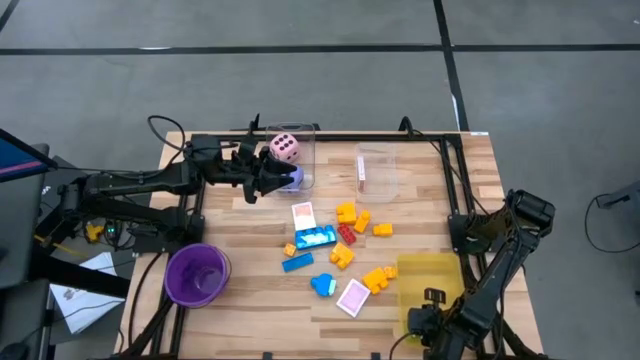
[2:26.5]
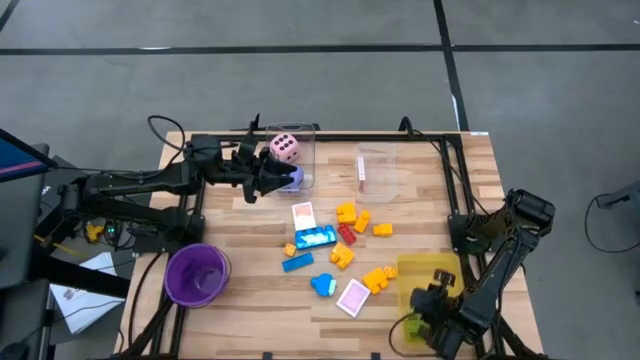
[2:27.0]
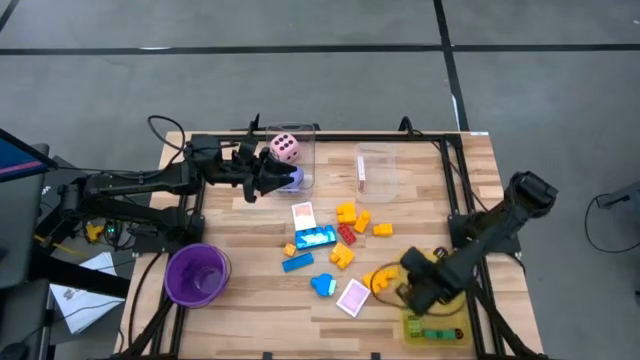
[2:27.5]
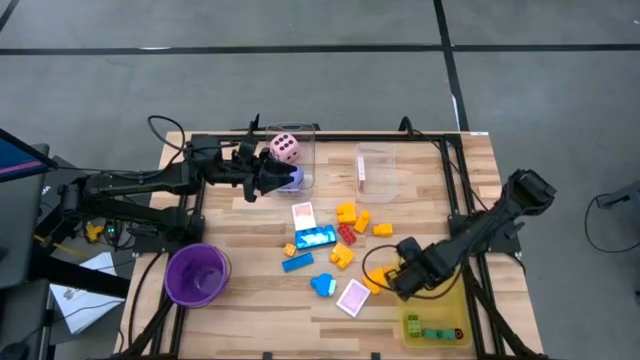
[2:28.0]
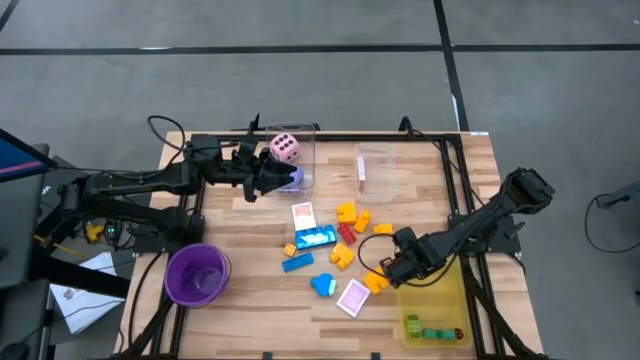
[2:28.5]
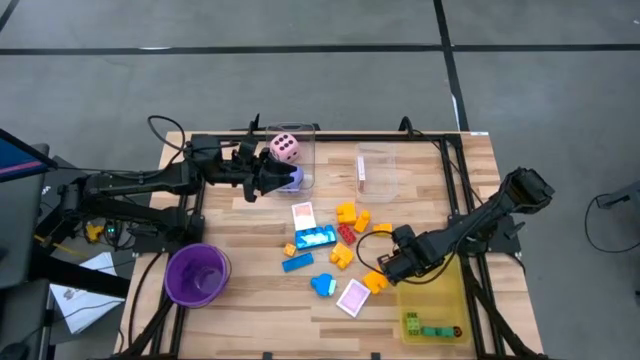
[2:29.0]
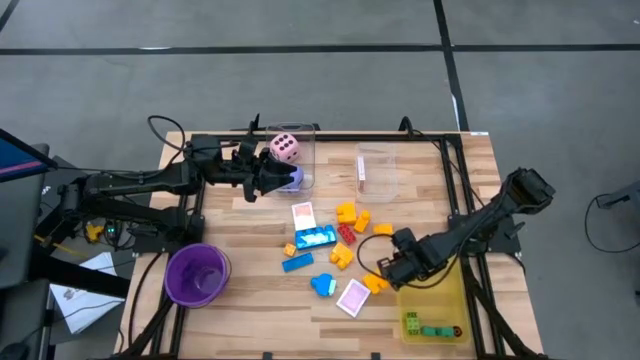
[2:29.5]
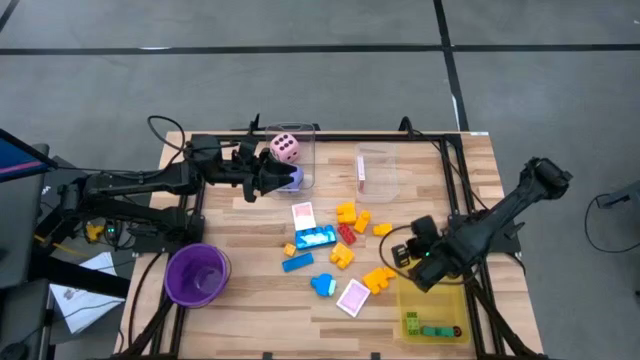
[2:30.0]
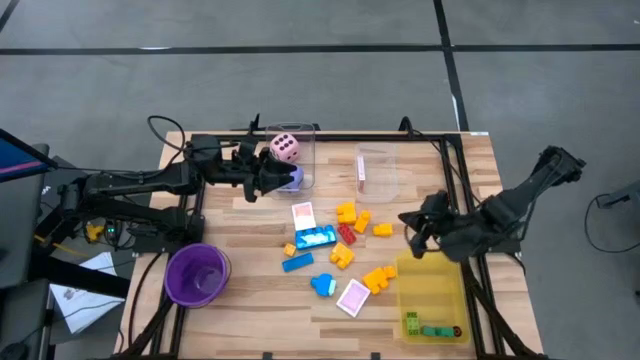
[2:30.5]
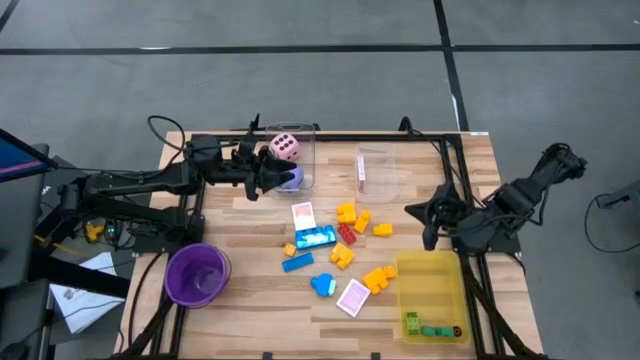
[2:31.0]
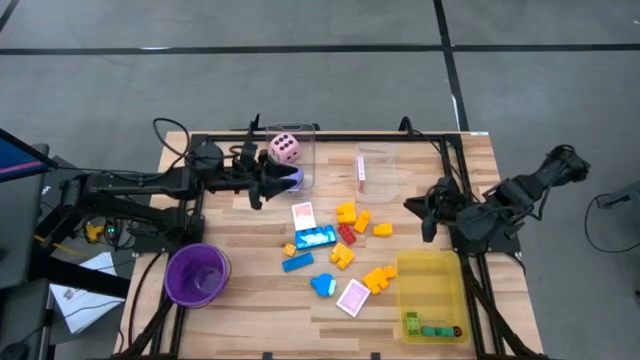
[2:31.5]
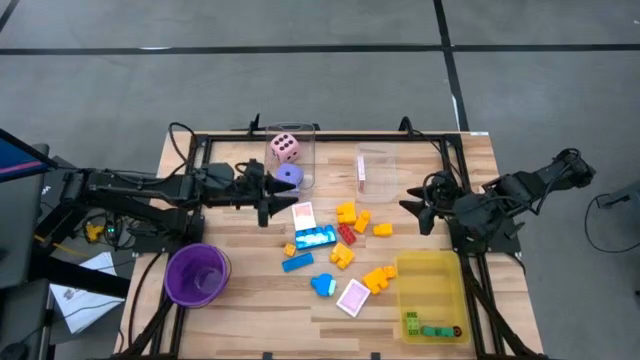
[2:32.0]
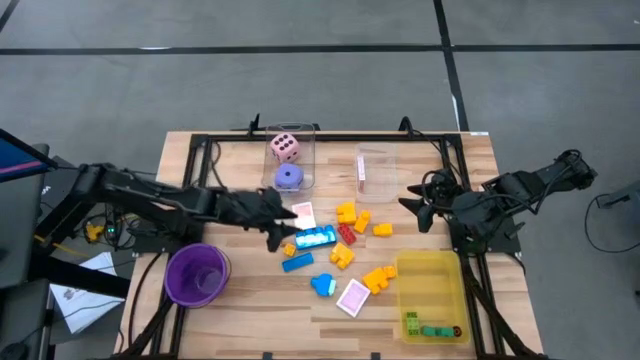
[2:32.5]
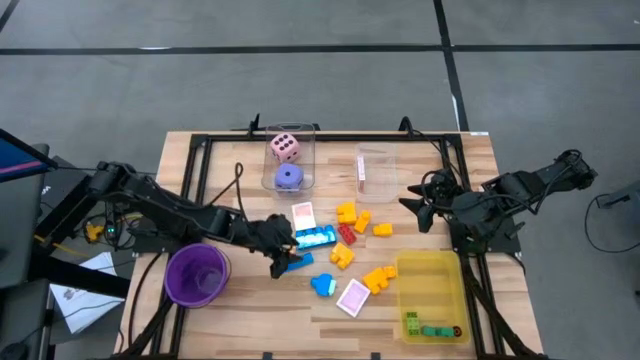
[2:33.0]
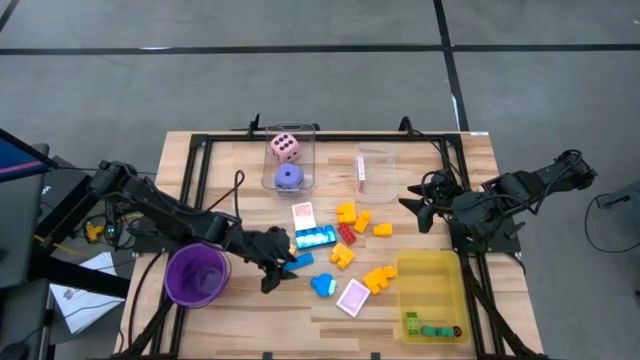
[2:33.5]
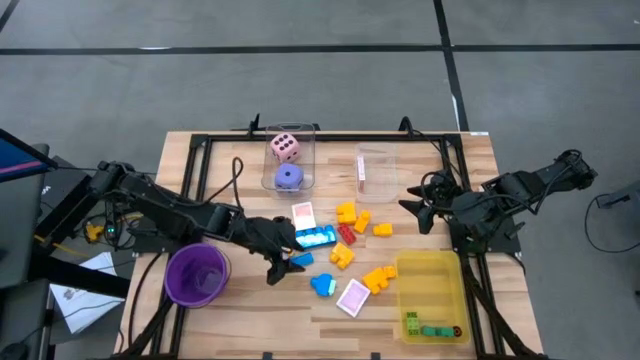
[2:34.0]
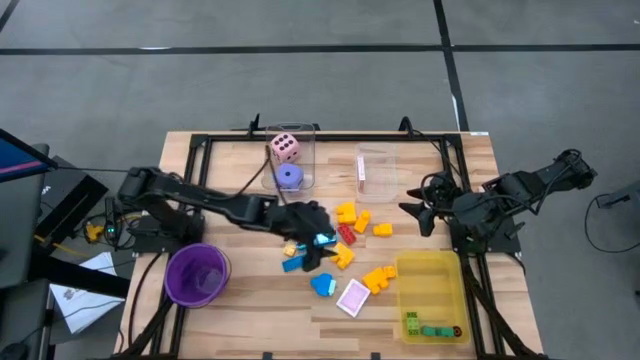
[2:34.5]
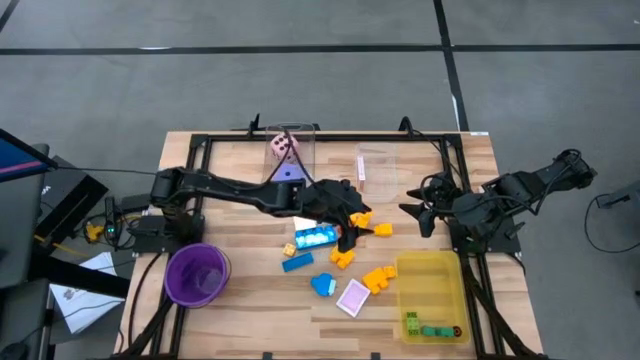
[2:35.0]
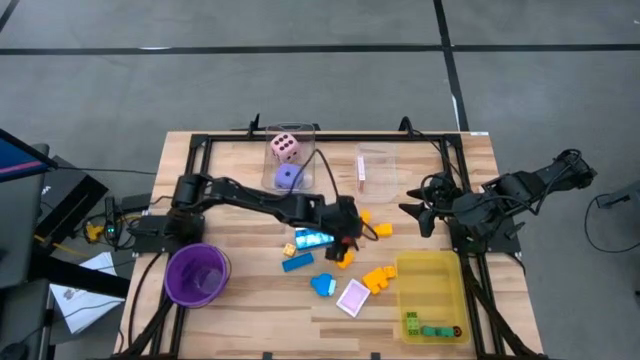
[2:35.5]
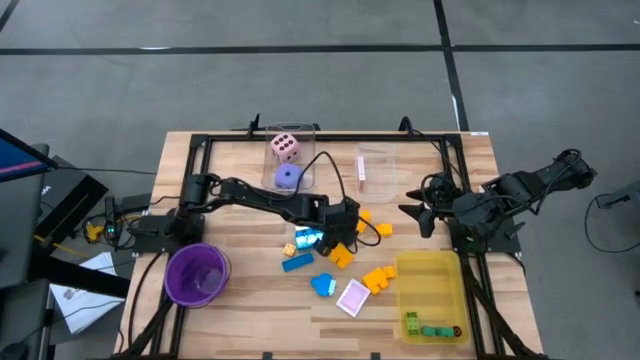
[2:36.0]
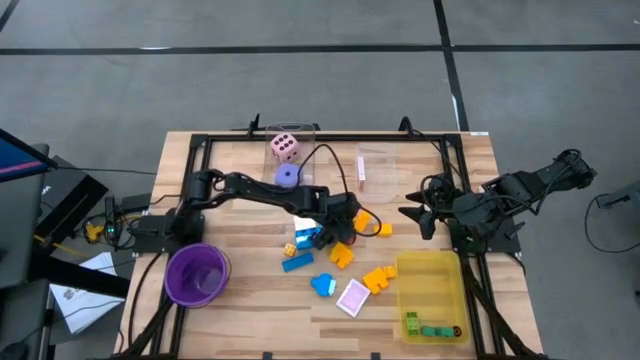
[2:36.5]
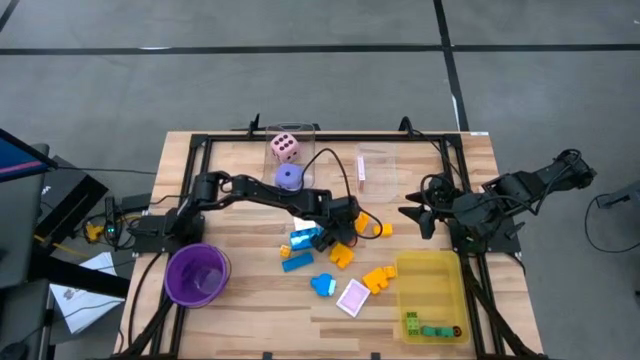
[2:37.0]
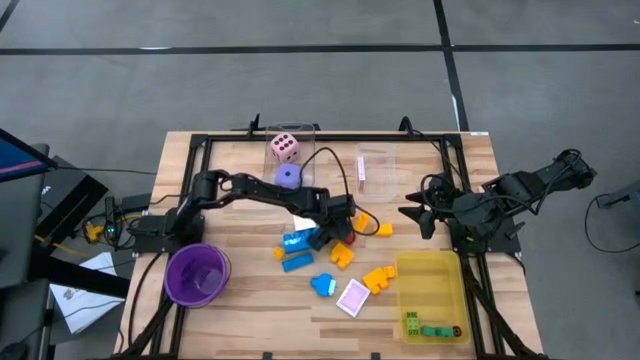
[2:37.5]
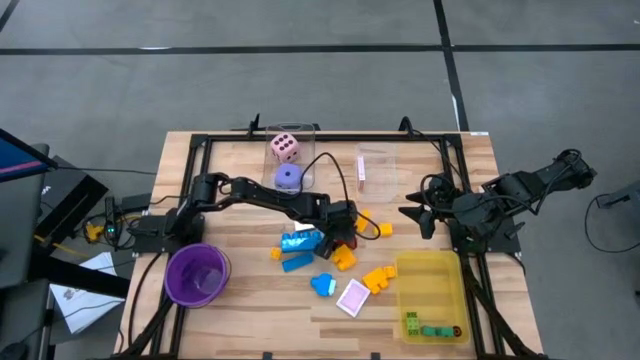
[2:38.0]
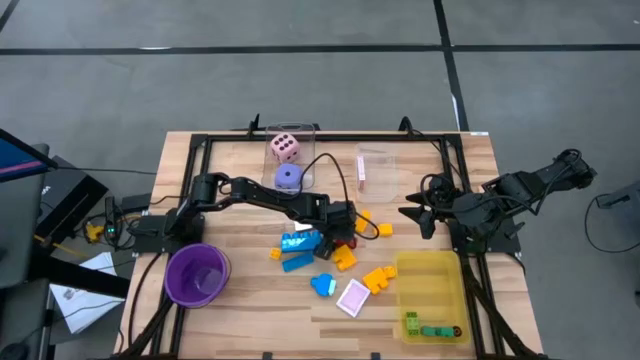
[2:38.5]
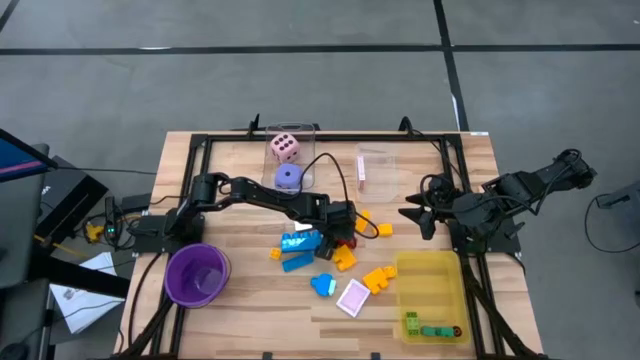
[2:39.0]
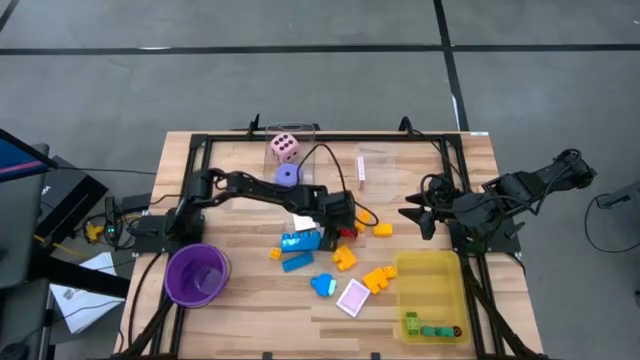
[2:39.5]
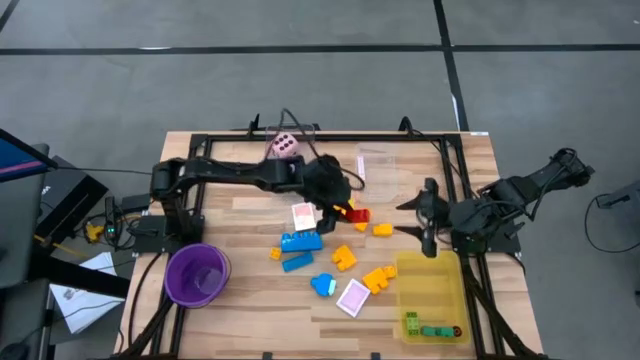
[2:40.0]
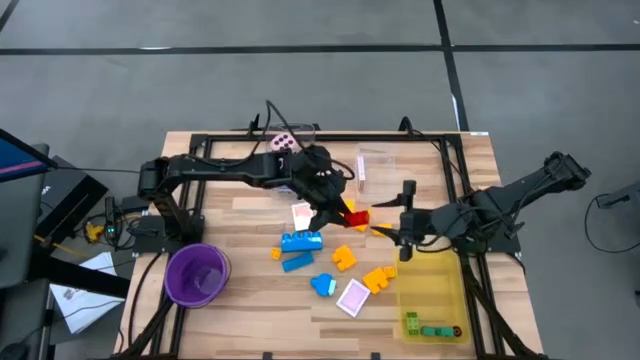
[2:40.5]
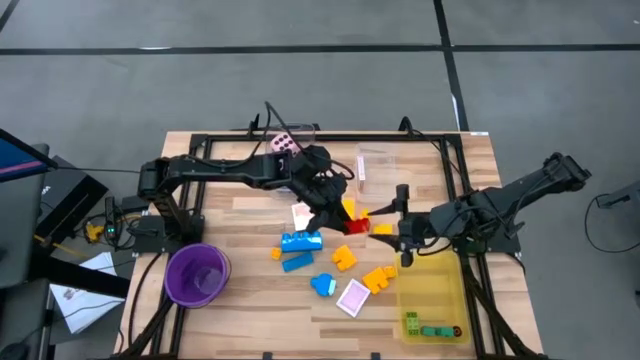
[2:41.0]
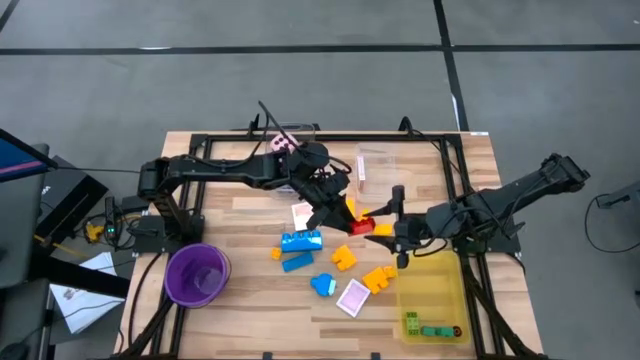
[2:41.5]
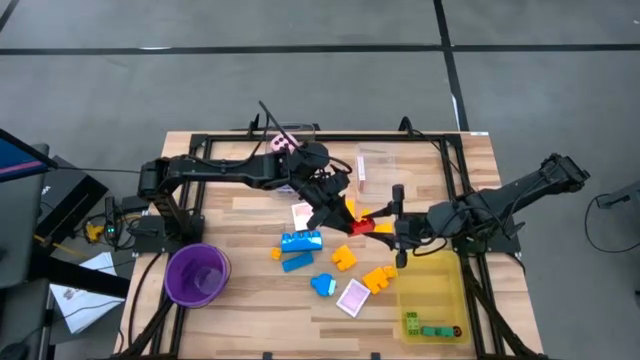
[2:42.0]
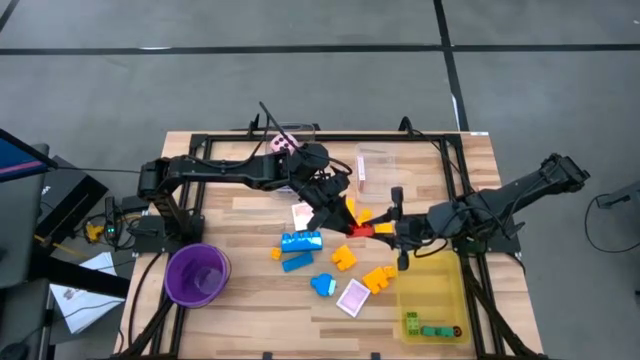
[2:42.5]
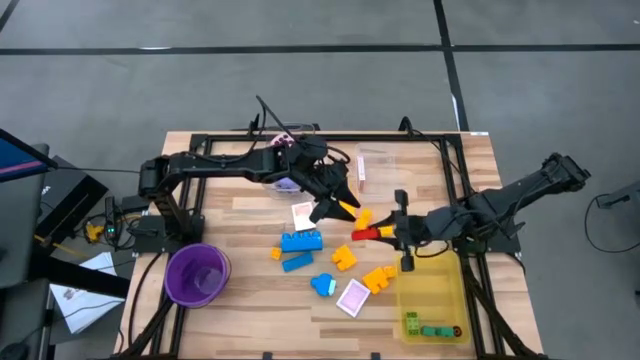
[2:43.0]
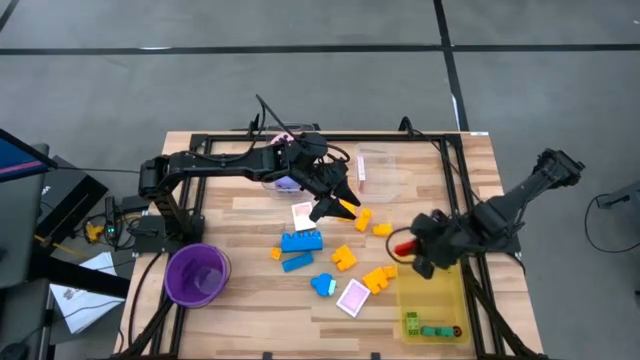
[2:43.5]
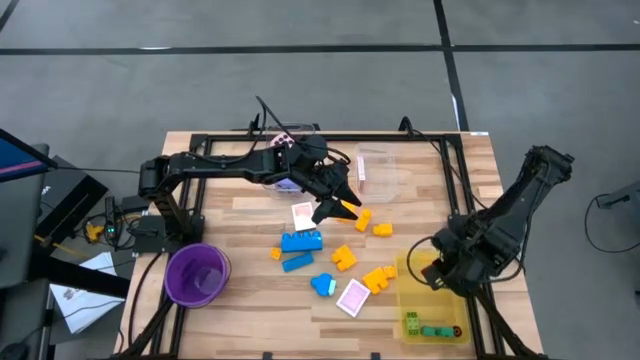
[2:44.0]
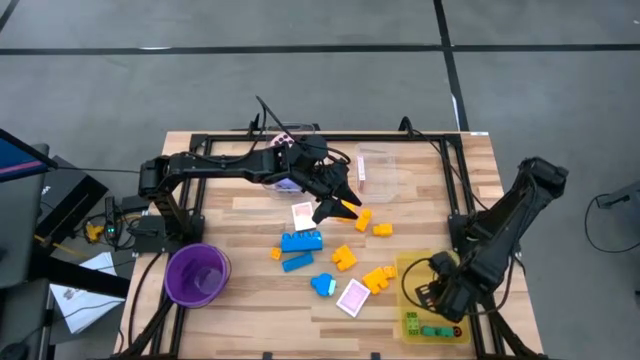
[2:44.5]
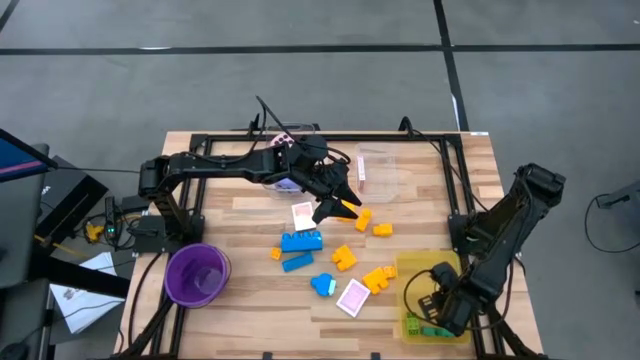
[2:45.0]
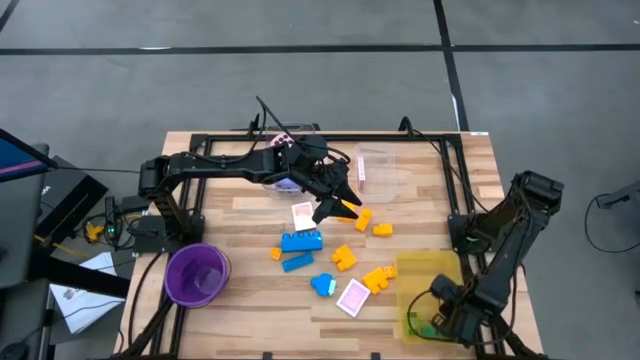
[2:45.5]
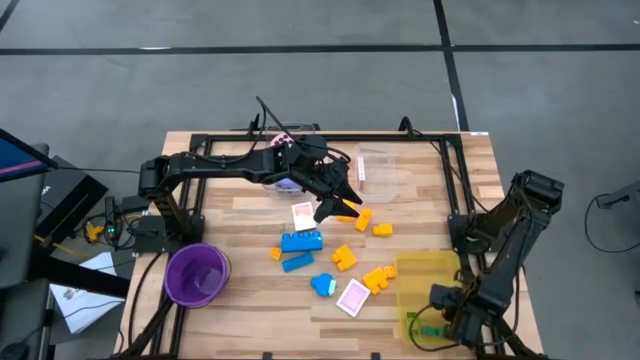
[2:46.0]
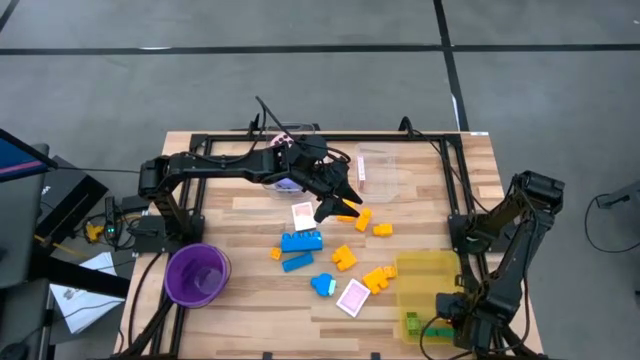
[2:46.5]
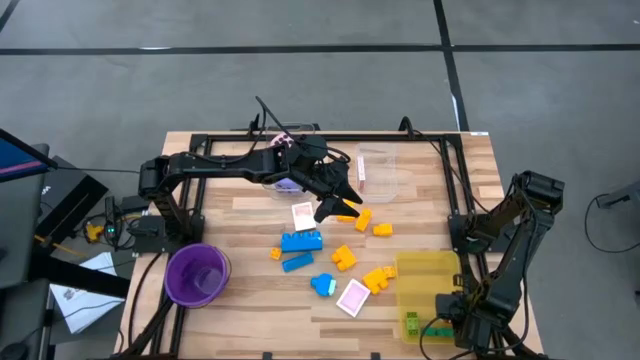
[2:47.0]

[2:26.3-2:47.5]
Task: Pick & Place Toys
Put the red game piece into the bin

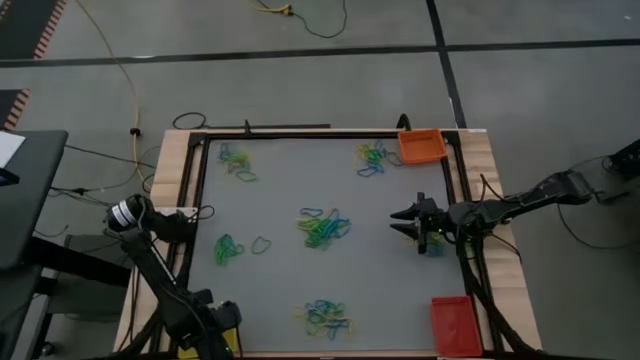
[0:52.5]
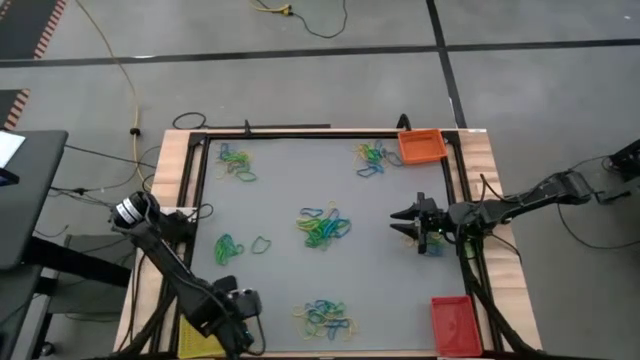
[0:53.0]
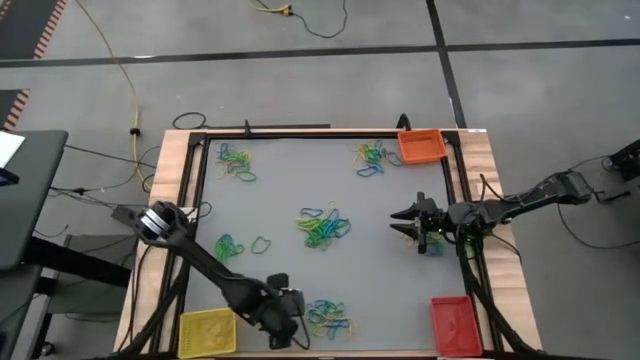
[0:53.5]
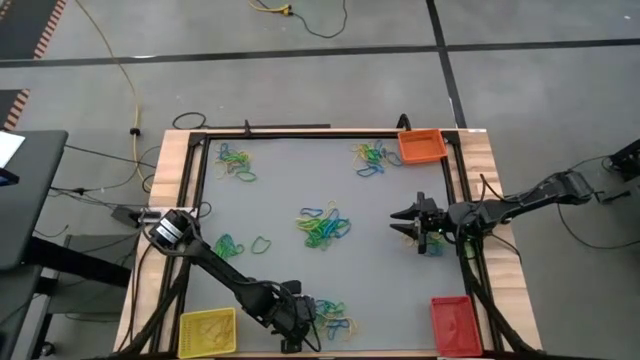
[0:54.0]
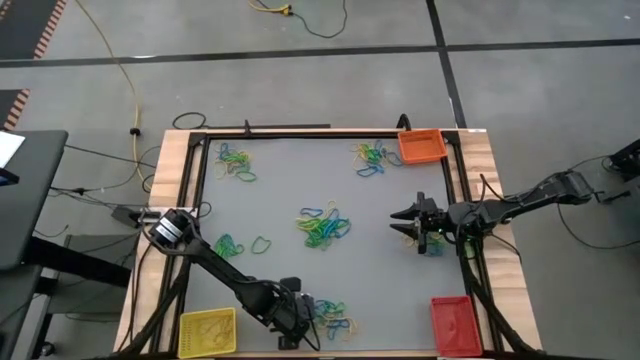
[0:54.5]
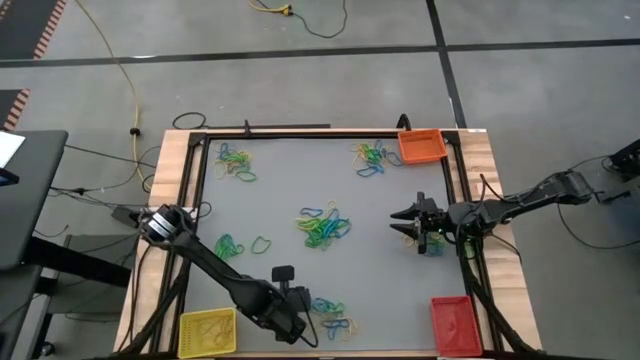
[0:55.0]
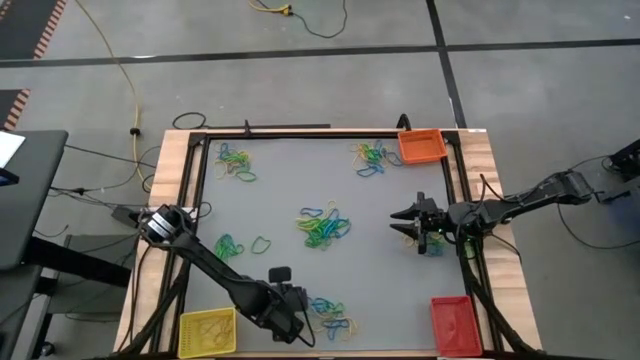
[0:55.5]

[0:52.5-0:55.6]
Task: Sort rubber bands into baskets
Put the yellow rubber band into the yellow bin
